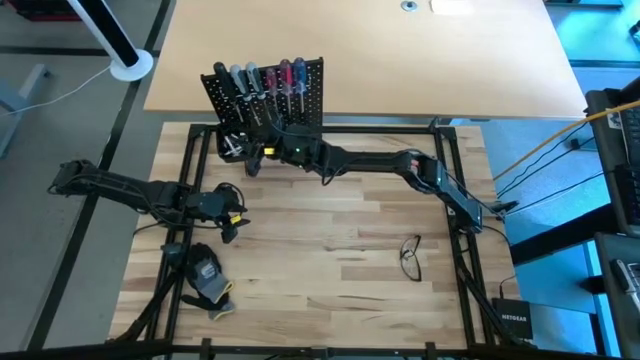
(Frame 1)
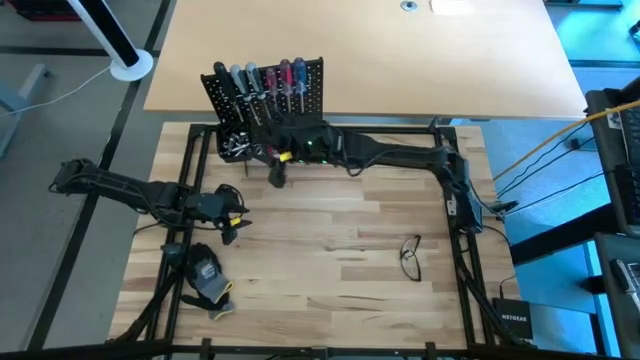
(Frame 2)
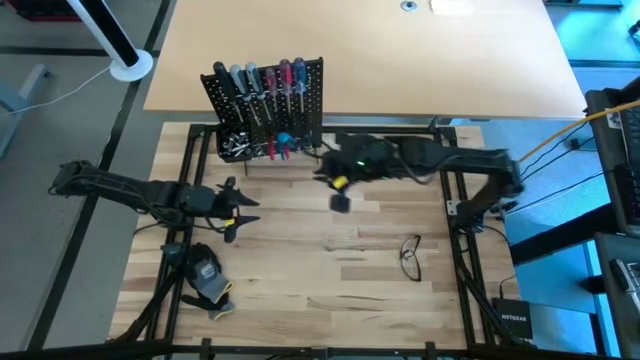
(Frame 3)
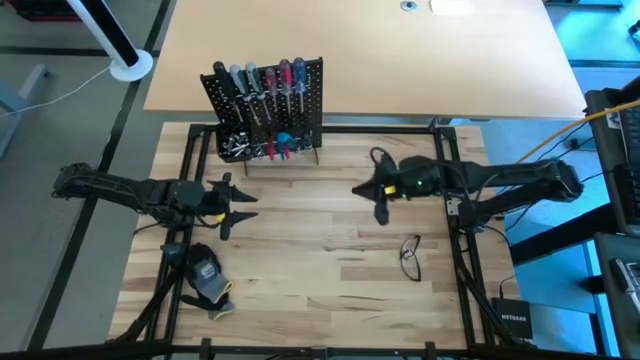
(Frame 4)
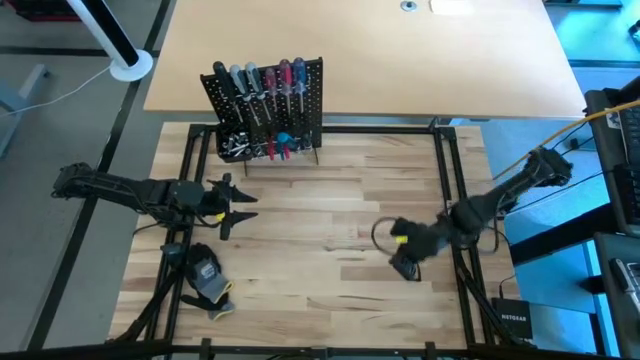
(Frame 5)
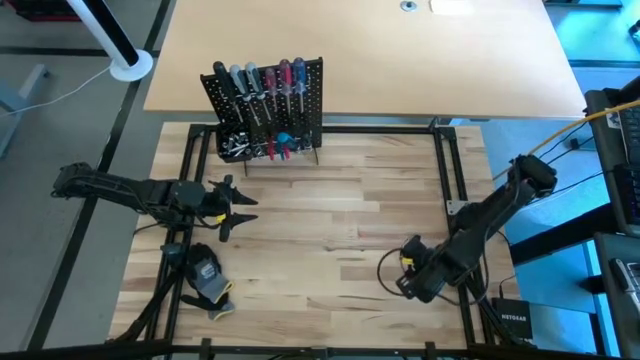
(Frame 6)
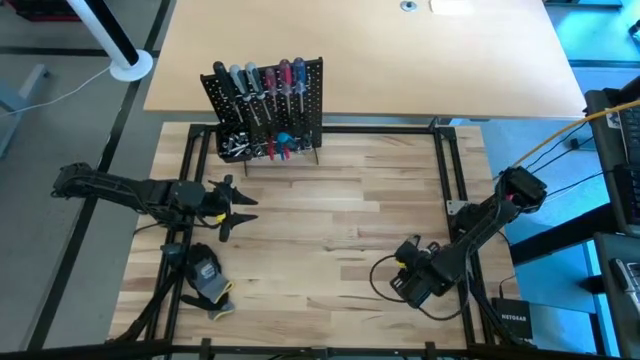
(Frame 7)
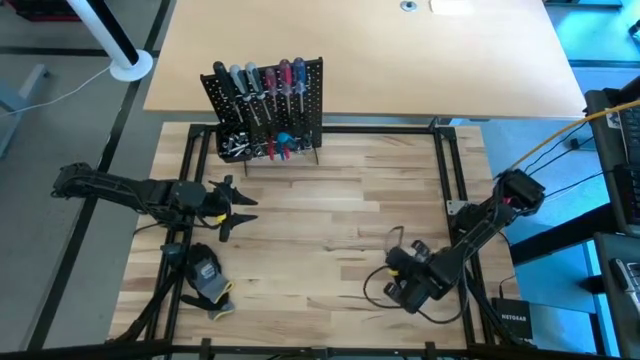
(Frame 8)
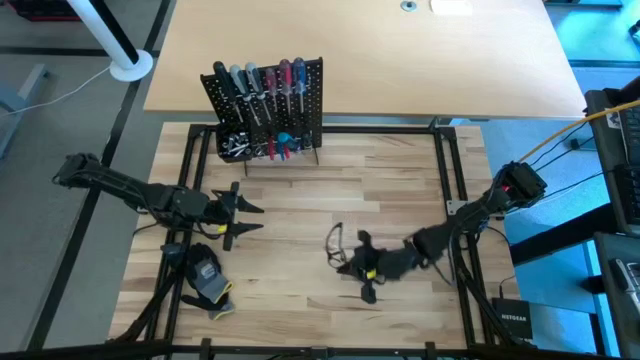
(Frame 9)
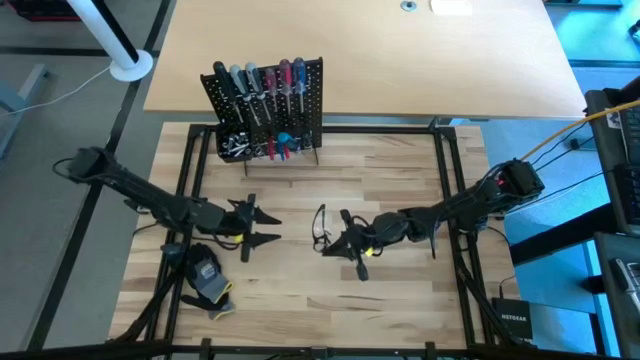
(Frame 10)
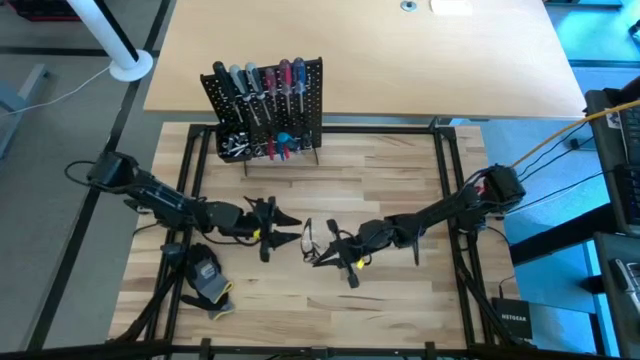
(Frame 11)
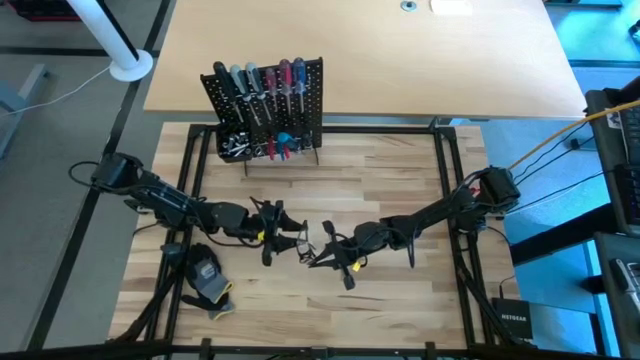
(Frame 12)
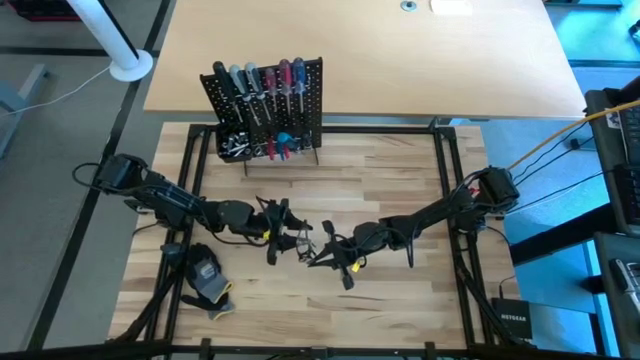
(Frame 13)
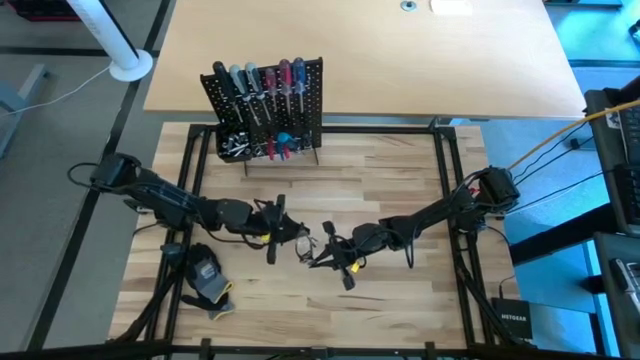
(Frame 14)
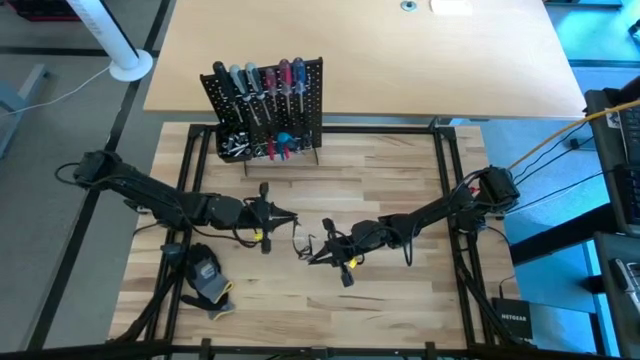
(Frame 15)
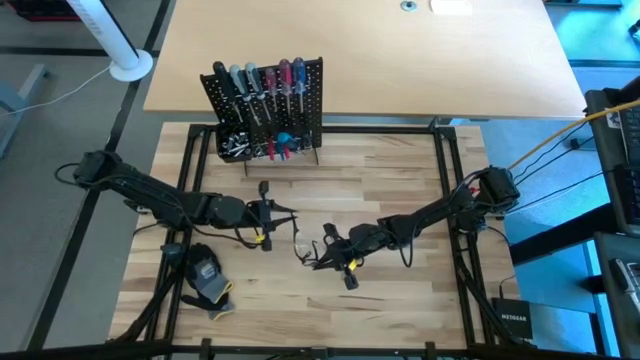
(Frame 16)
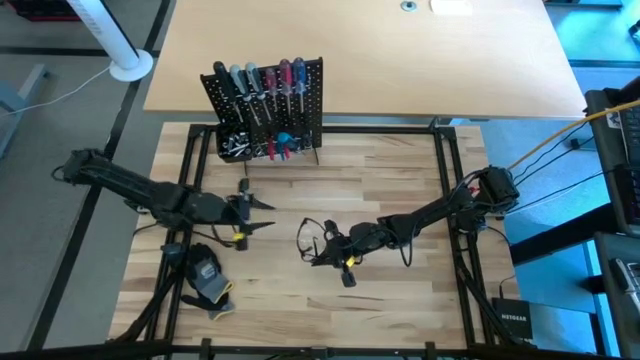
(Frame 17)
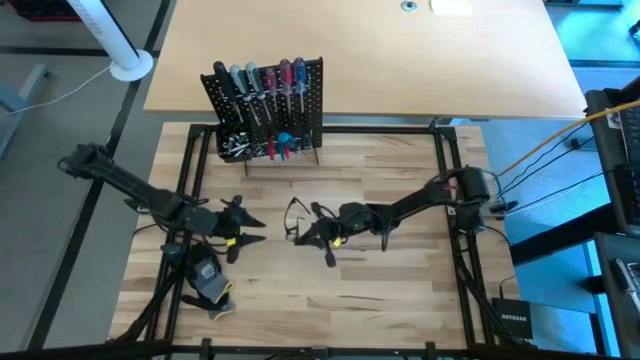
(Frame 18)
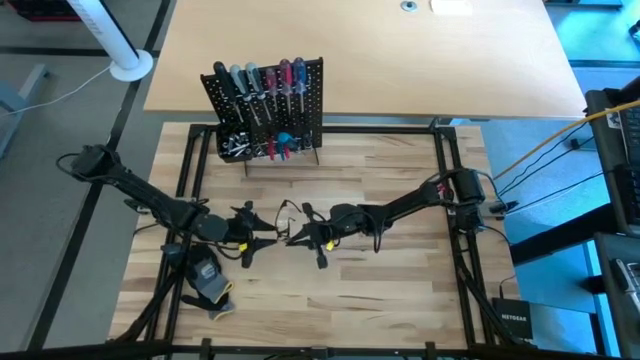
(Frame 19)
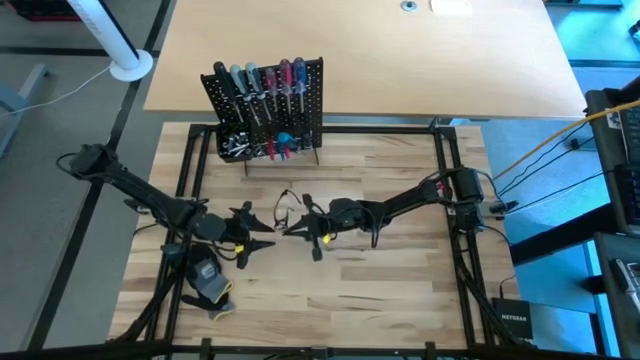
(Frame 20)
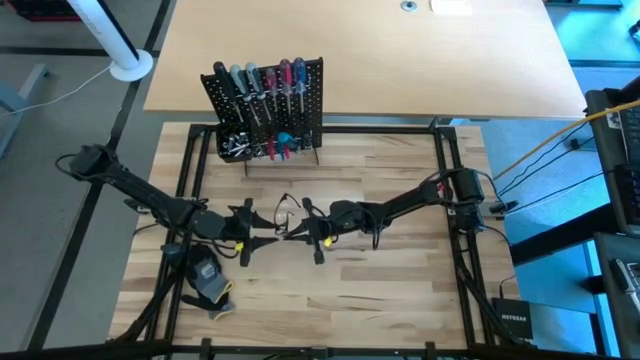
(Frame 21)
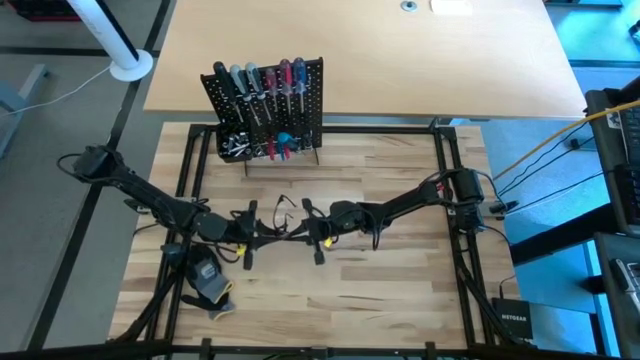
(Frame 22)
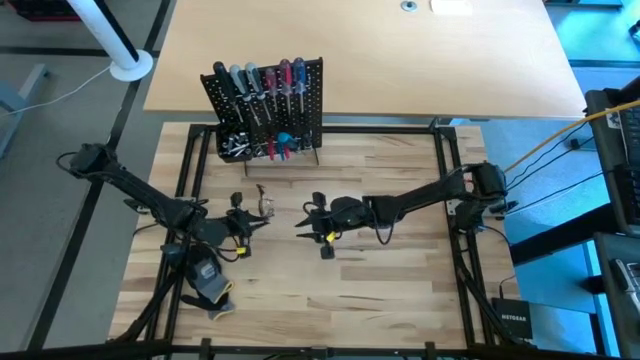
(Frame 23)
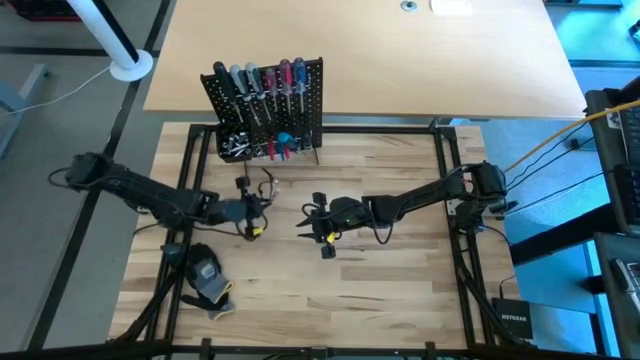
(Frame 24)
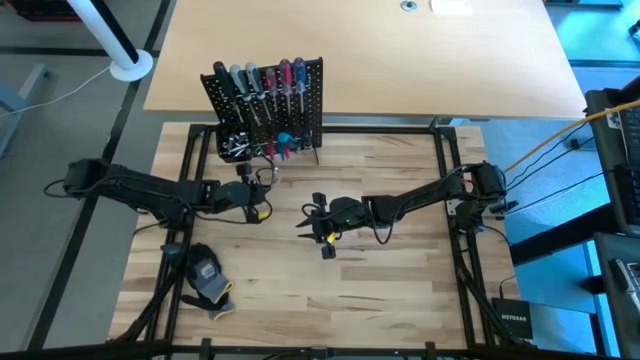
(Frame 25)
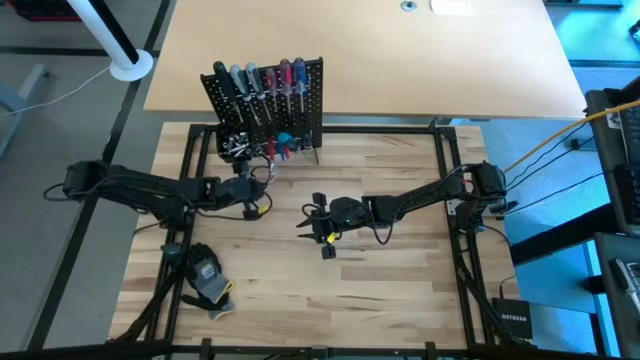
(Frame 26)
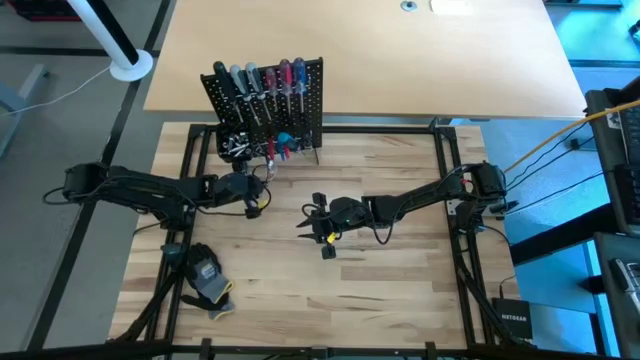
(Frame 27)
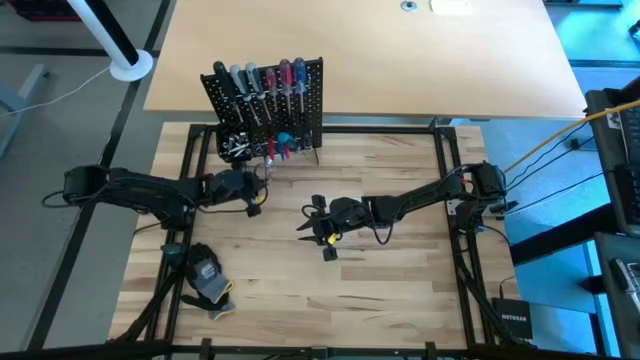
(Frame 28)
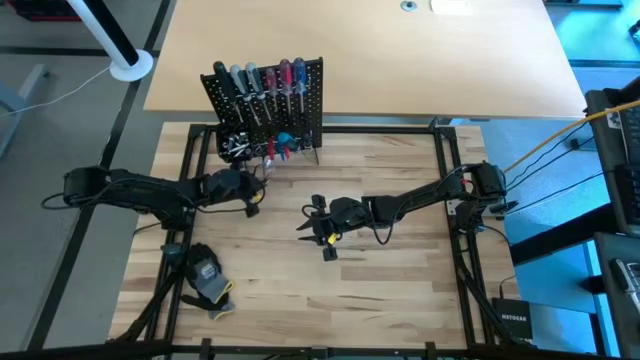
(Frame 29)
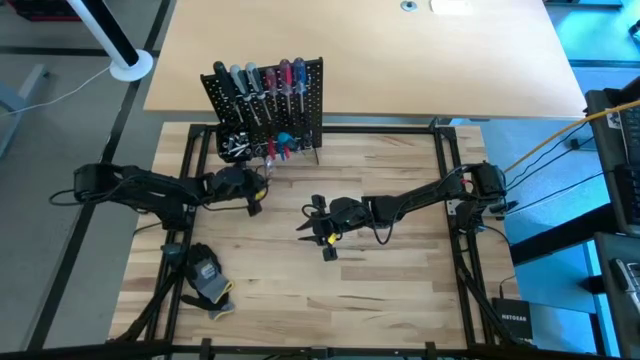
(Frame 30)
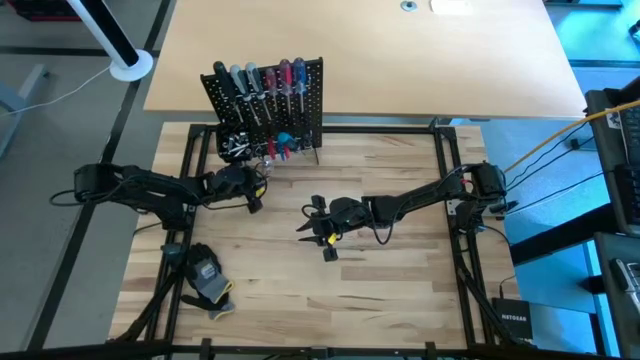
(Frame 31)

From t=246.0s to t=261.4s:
Task: Hang tools onto peg board
Hang the black safety glasses onto the peg board

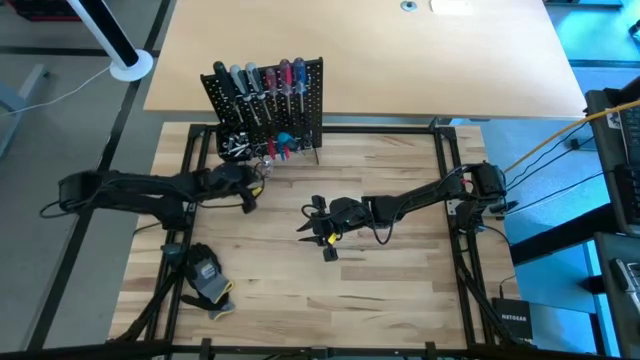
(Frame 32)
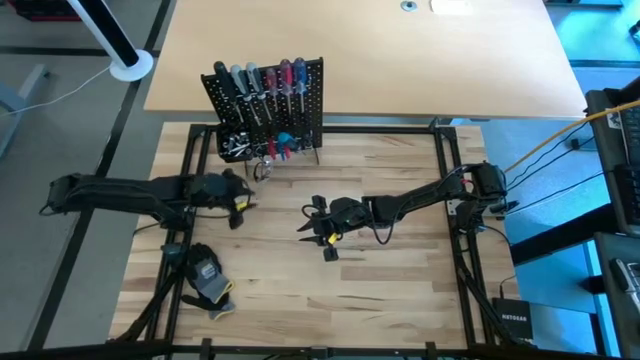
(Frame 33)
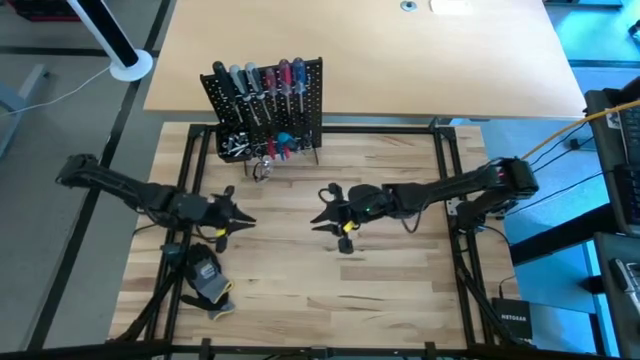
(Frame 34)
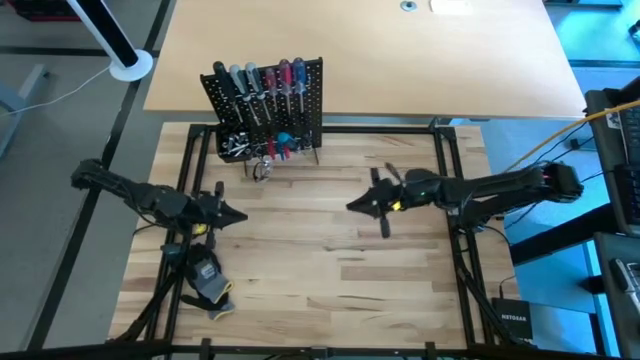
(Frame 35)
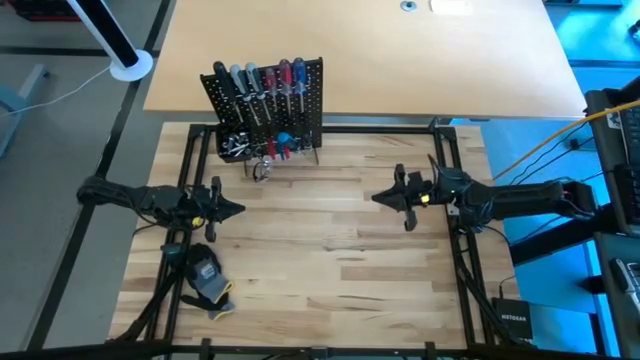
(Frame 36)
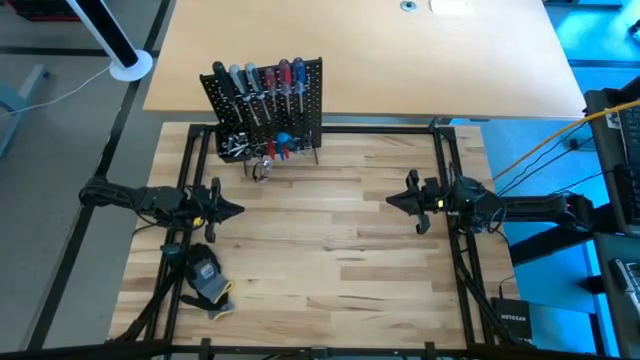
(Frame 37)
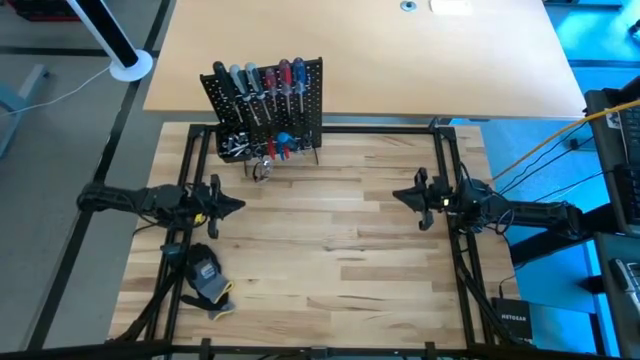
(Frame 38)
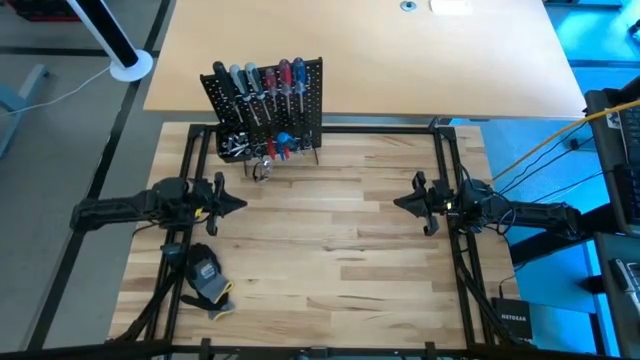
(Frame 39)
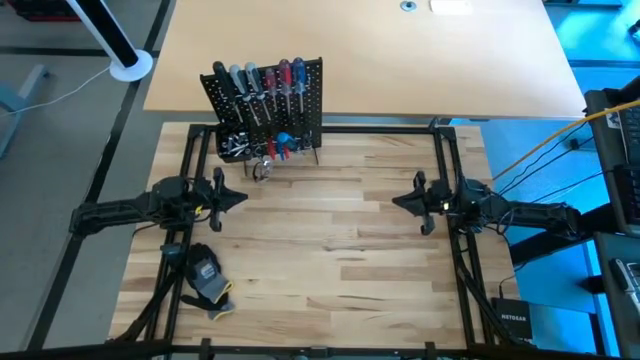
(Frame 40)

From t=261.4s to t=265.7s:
Return to Home Position
